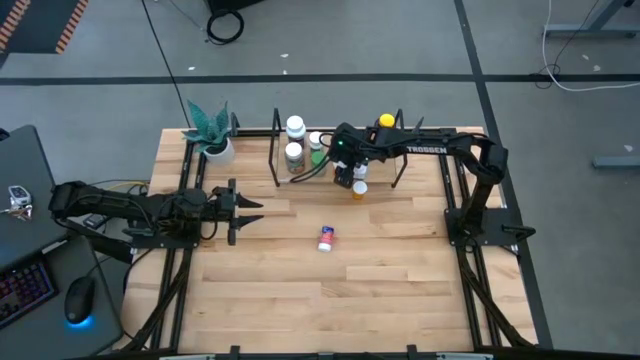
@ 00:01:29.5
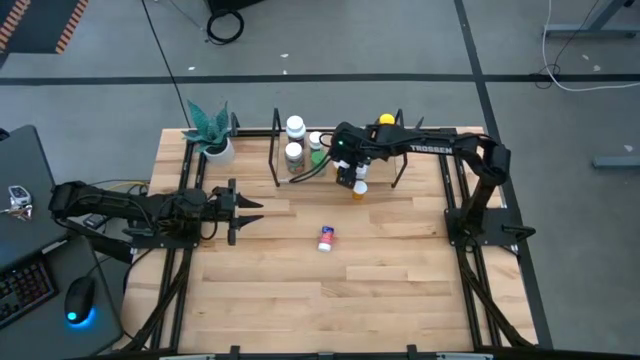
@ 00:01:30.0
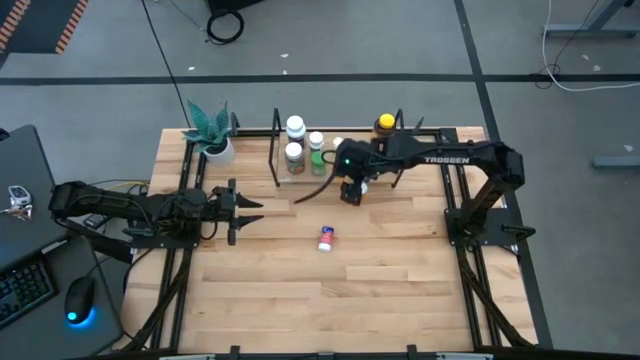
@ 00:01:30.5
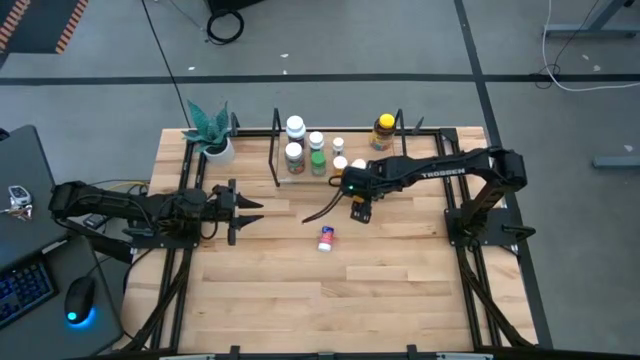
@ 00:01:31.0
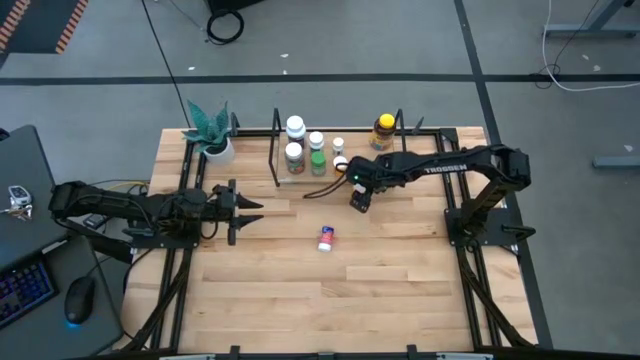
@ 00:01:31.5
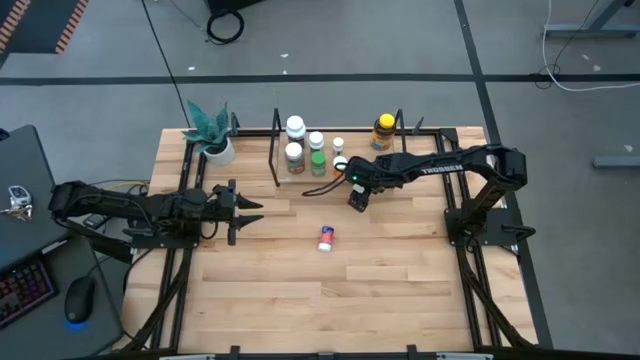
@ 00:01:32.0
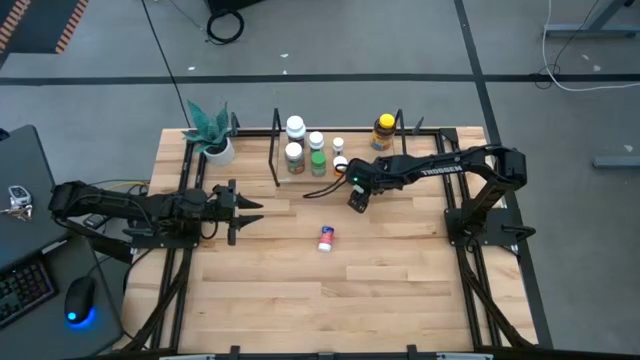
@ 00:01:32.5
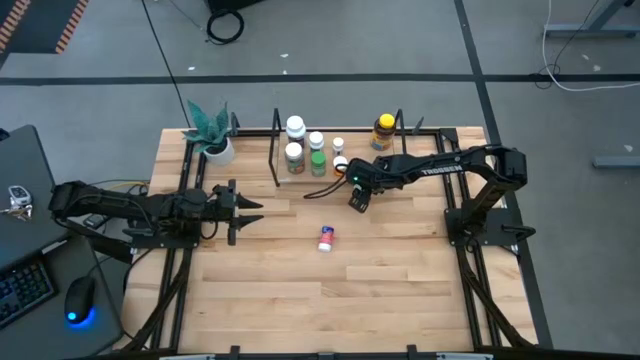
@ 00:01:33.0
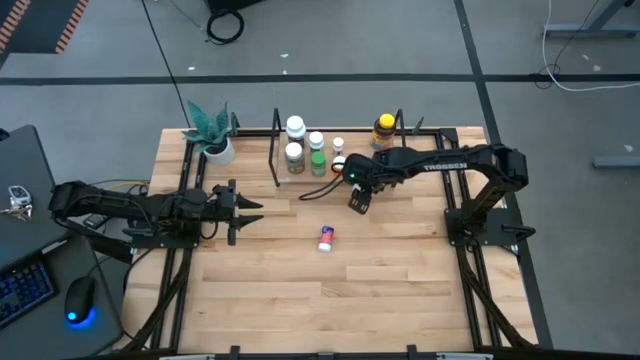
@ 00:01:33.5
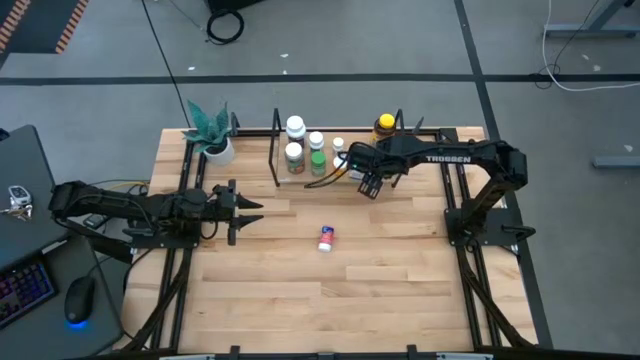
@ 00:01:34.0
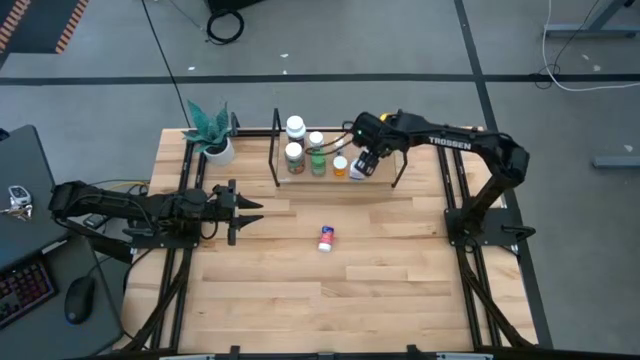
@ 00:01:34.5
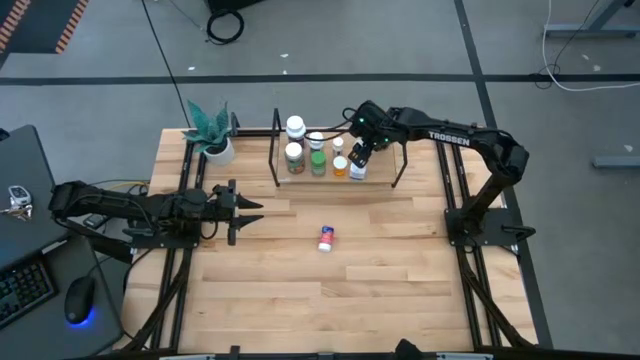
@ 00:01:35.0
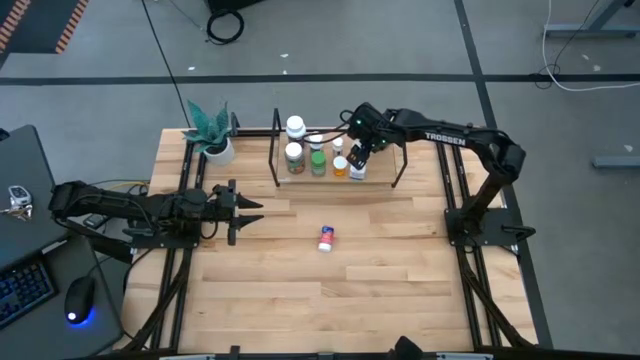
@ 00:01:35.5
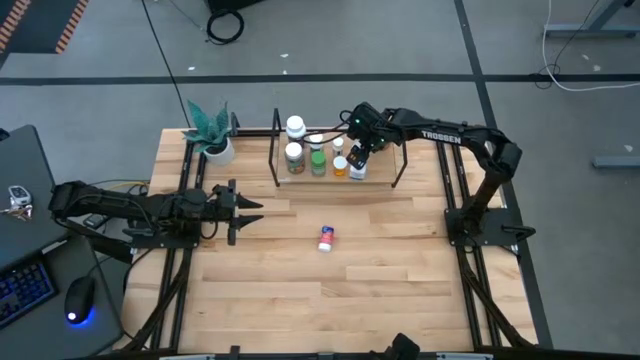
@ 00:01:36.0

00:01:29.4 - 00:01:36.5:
Task: Pick and place medicine bottles onto shelf by color
Put the orange pill bottle on the shelf

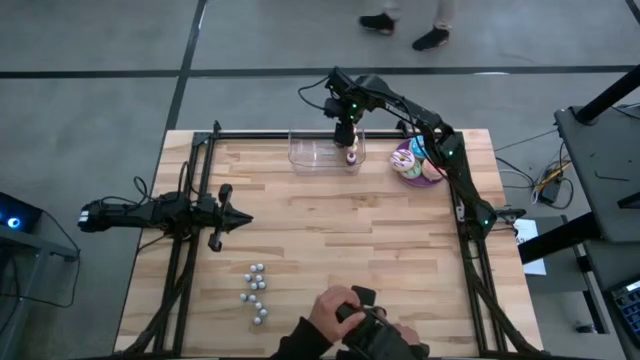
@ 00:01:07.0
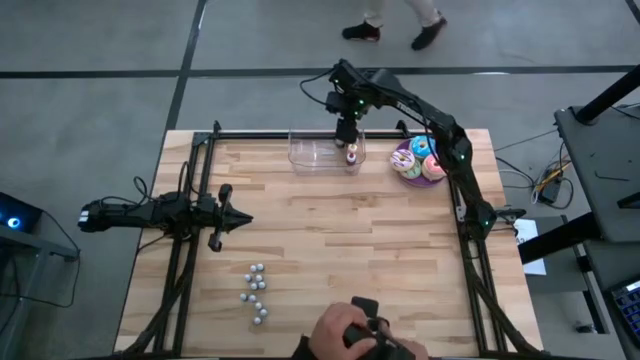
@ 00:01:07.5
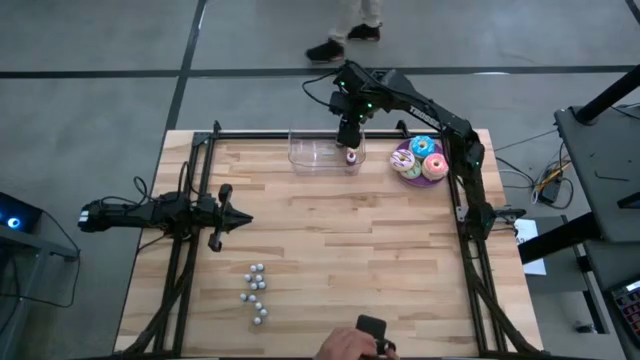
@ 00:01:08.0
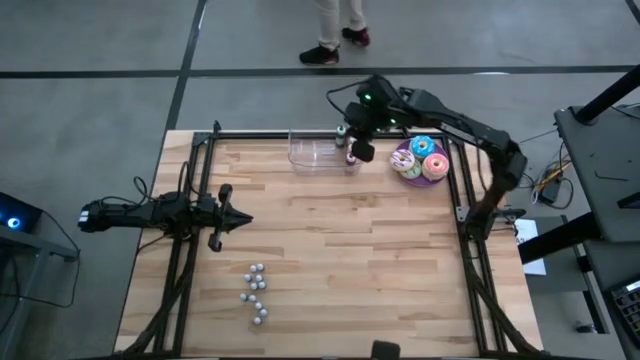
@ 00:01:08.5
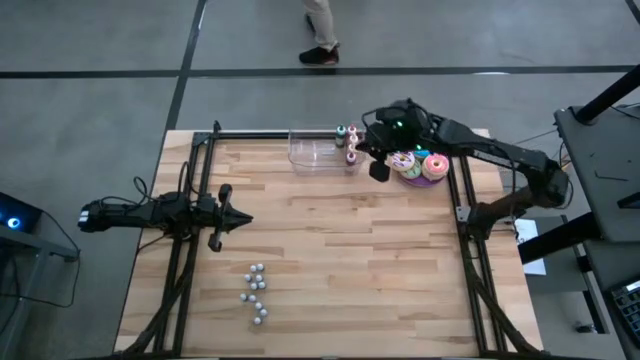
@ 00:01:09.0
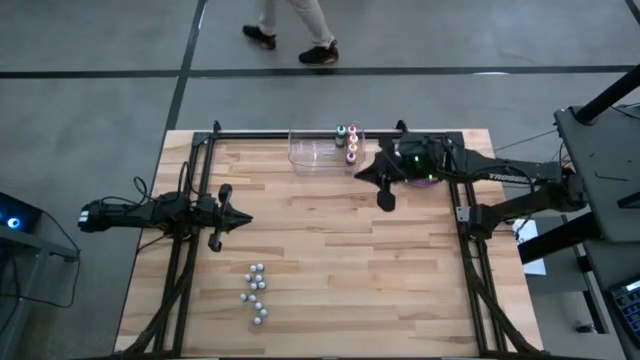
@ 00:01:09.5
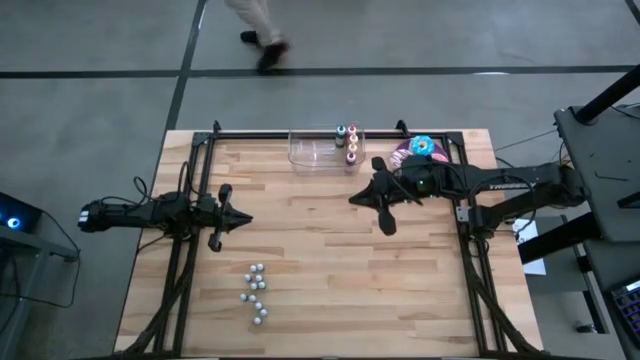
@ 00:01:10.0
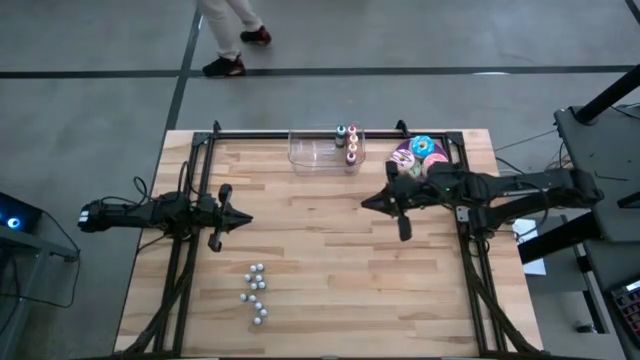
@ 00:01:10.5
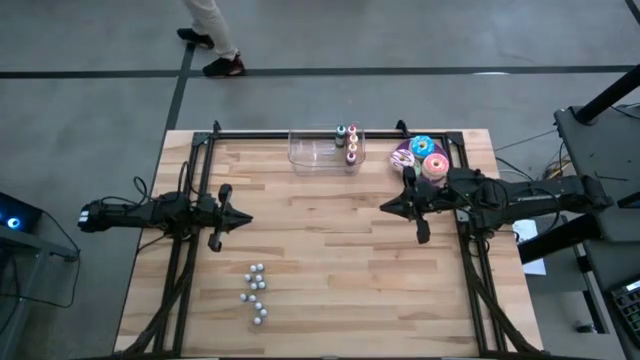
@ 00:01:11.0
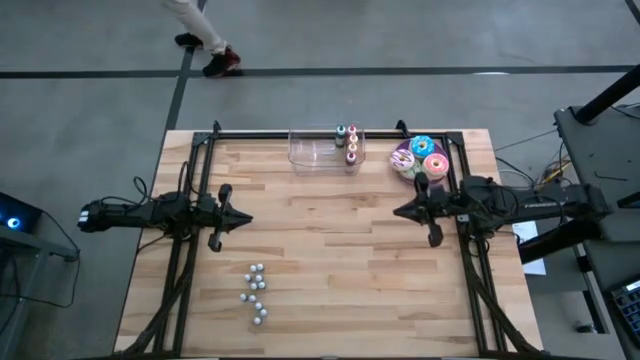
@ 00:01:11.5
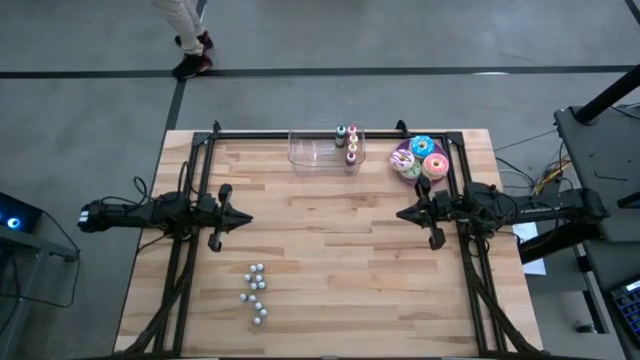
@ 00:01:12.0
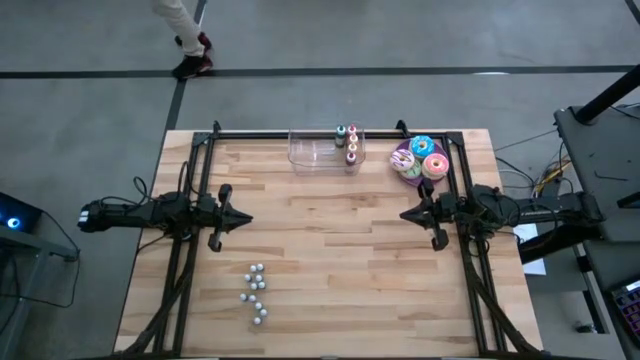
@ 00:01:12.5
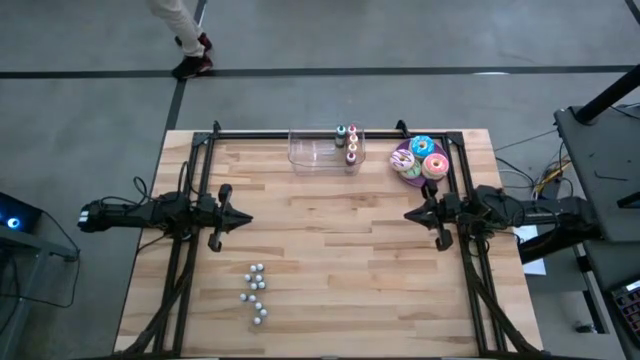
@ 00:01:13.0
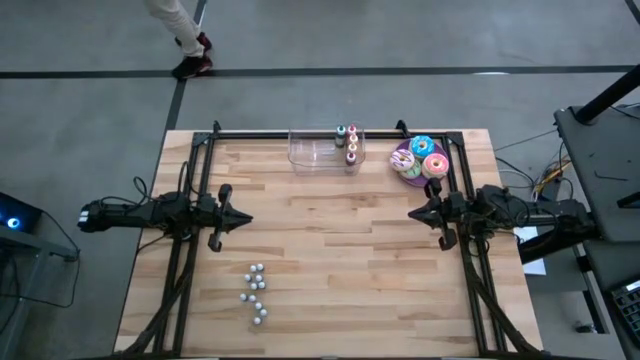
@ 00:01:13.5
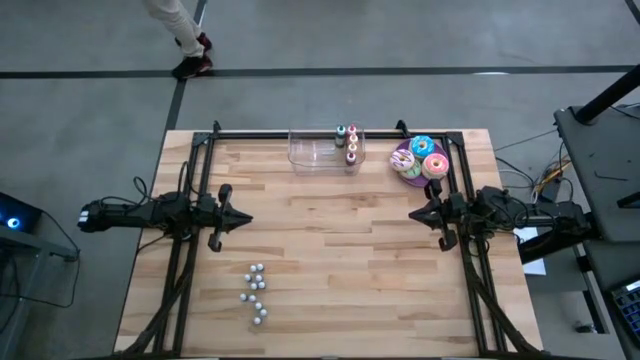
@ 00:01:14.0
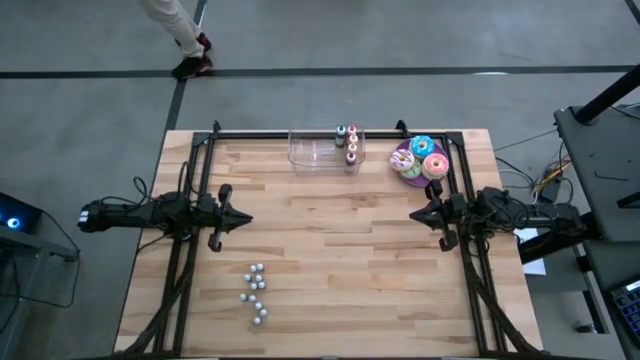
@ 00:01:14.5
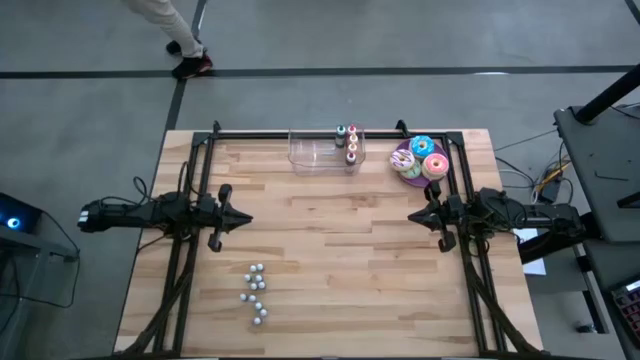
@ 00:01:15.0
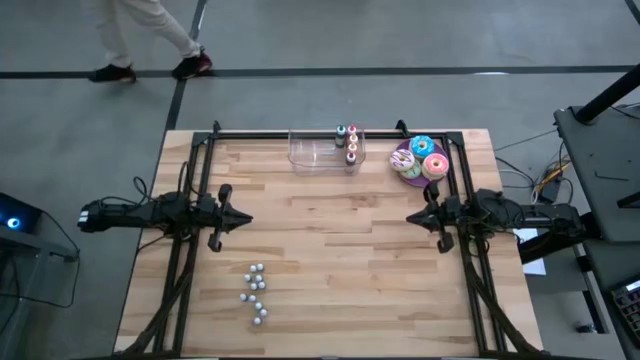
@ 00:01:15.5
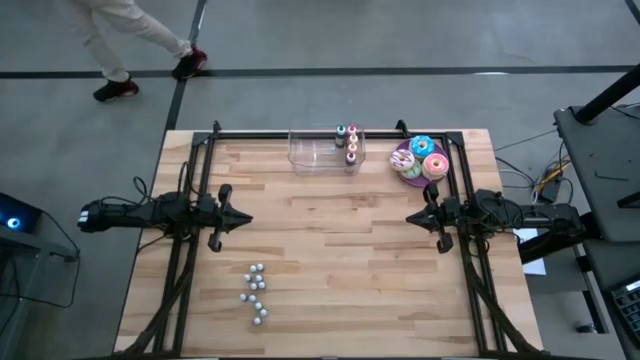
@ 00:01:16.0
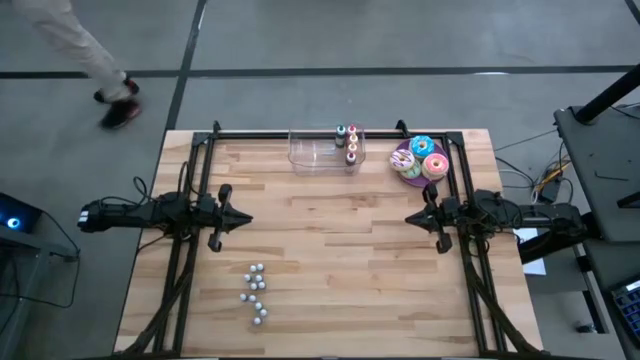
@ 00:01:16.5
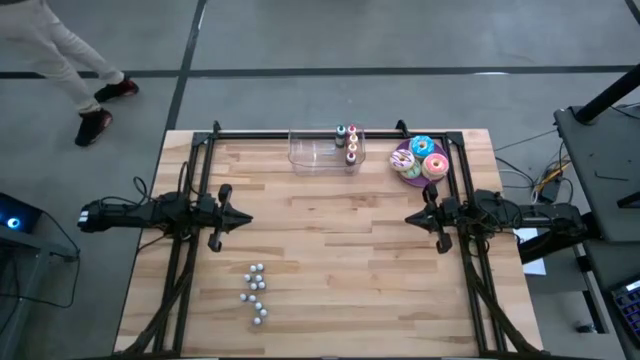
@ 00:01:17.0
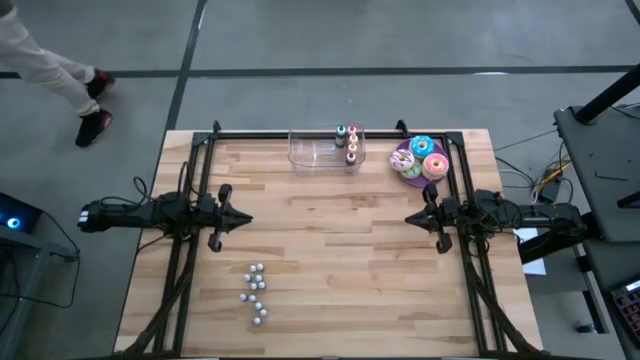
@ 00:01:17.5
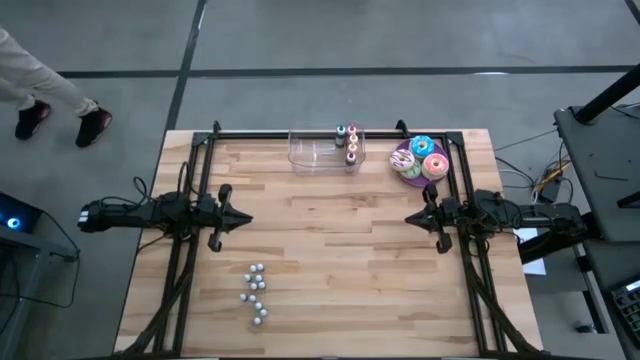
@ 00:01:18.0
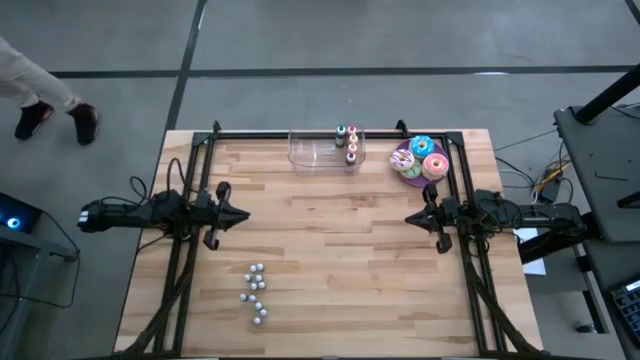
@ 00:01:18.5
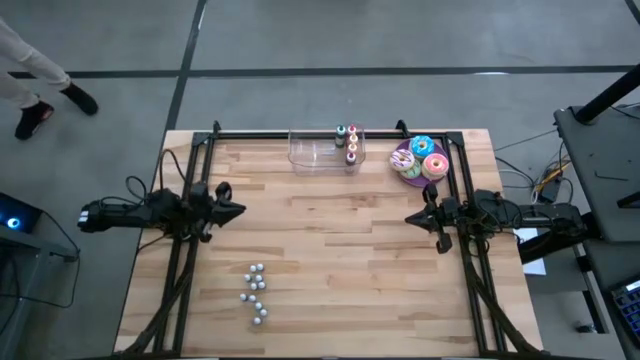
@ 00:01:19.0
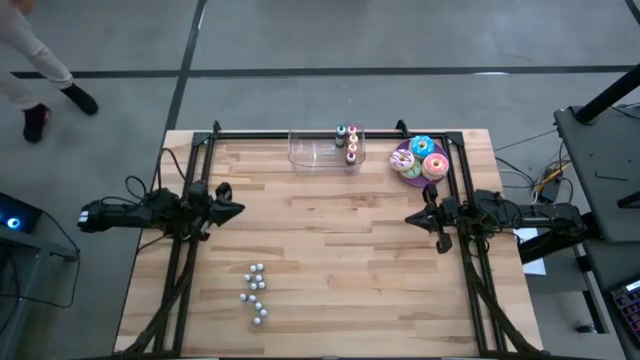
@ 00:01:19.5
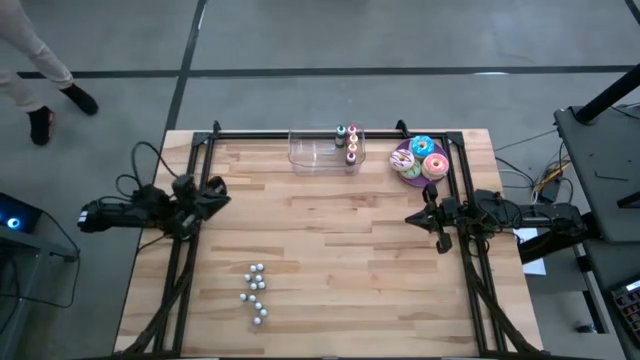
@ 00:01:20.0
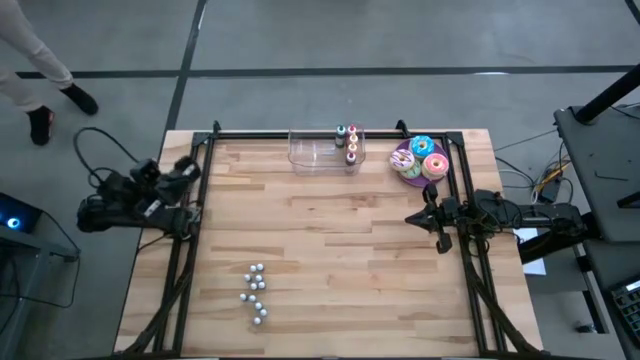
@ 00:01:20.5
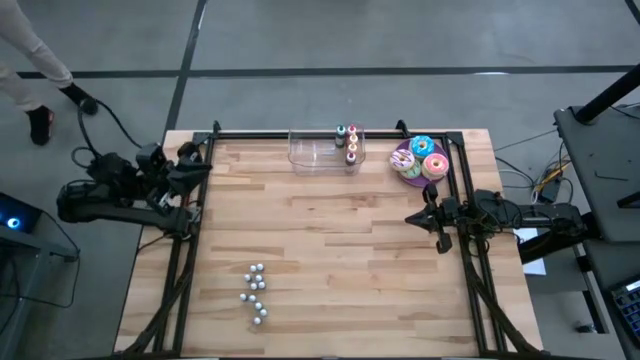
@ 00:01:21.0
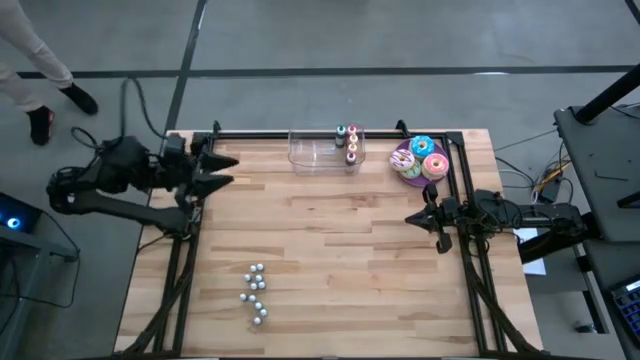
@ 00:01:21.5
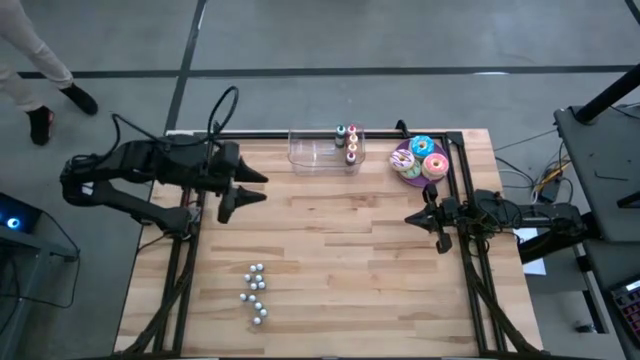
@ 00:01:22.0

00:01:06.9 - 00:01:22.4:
Task: Pick & Place food coloring
Put the small purple food coloring bottle into the transparent bin
